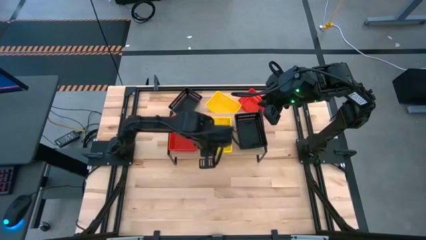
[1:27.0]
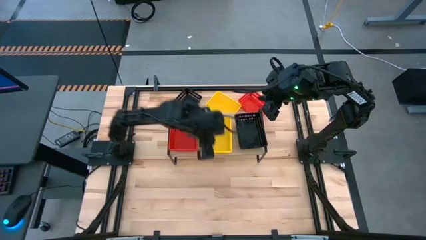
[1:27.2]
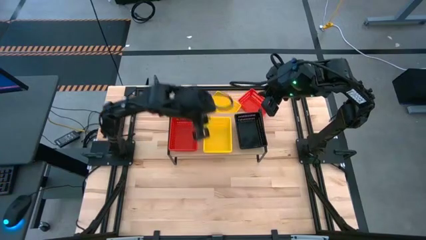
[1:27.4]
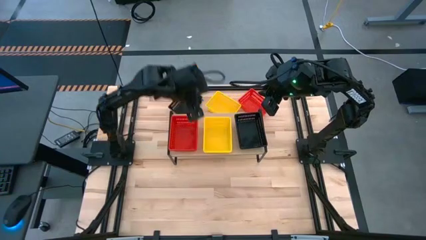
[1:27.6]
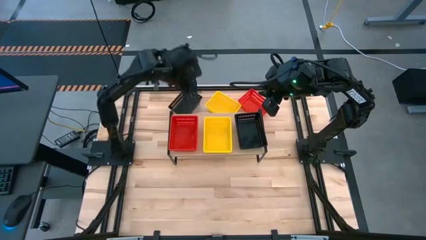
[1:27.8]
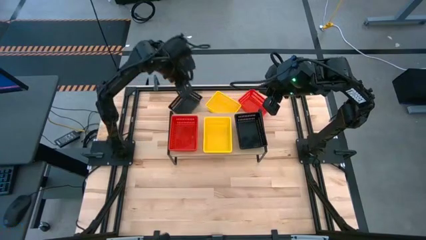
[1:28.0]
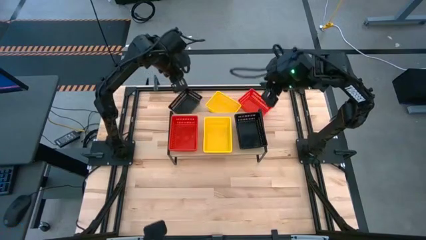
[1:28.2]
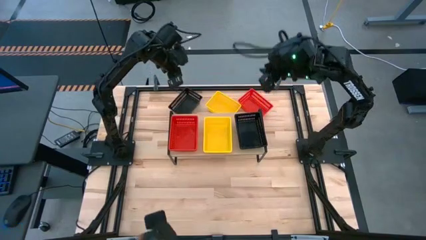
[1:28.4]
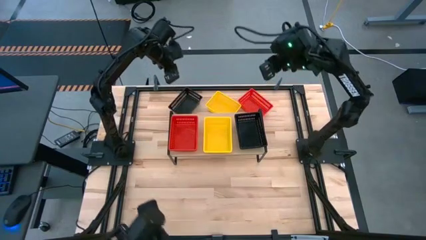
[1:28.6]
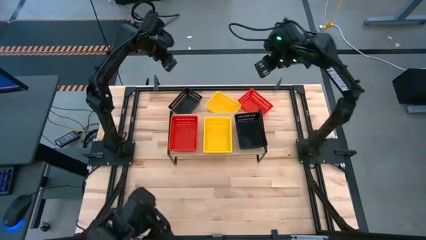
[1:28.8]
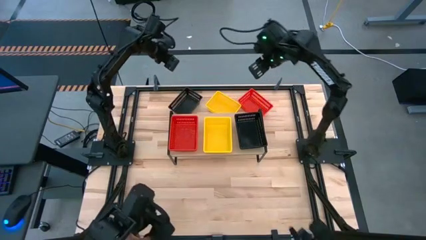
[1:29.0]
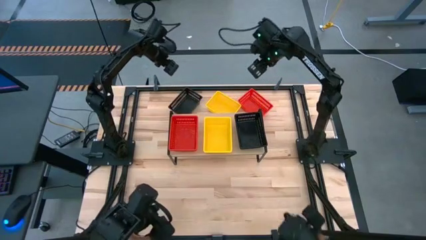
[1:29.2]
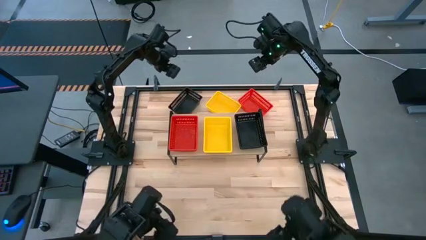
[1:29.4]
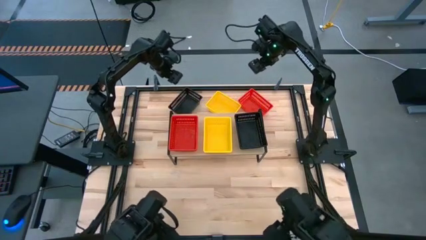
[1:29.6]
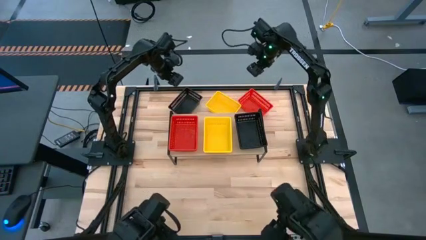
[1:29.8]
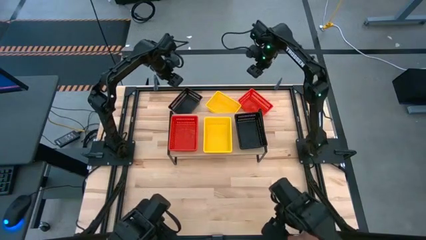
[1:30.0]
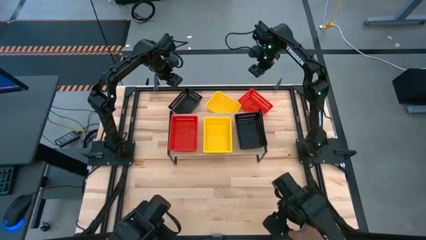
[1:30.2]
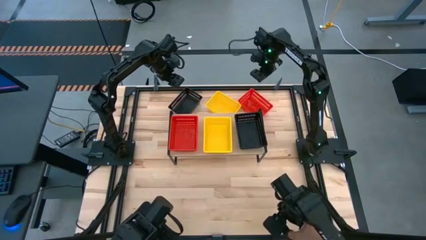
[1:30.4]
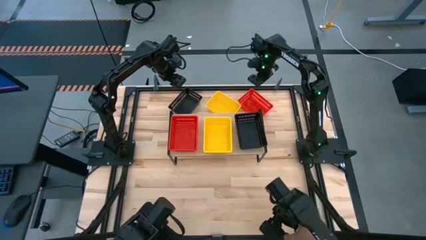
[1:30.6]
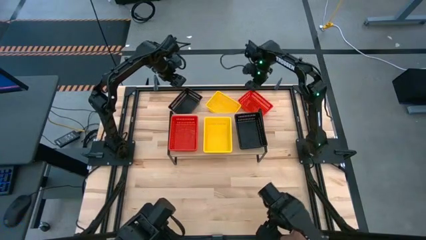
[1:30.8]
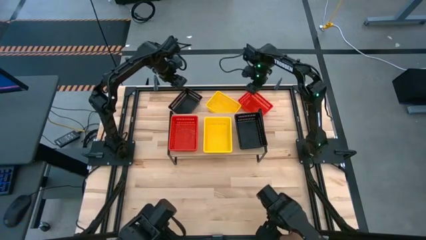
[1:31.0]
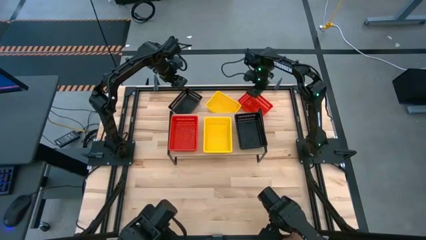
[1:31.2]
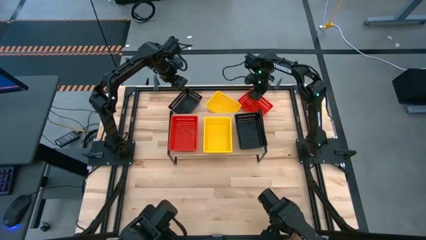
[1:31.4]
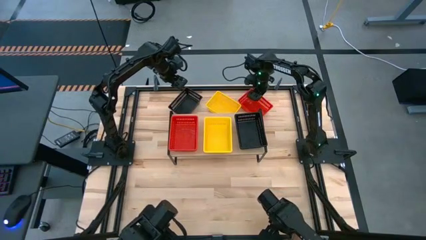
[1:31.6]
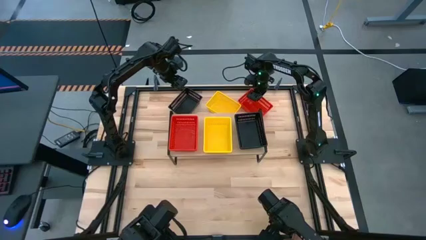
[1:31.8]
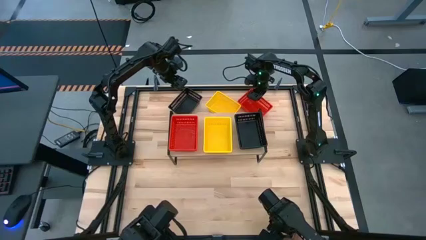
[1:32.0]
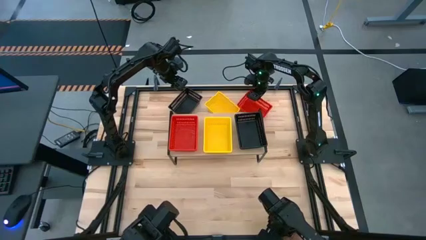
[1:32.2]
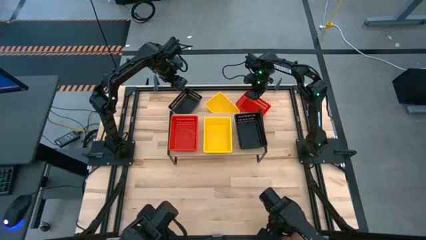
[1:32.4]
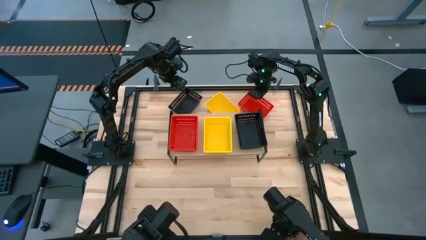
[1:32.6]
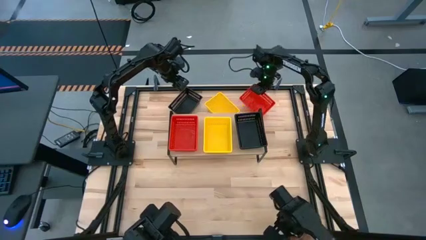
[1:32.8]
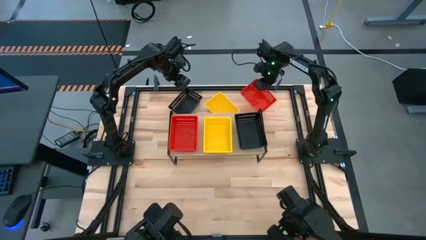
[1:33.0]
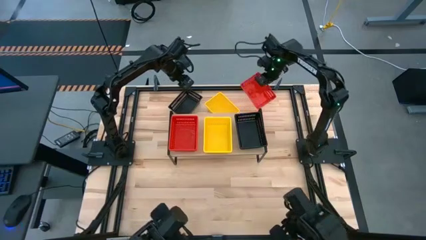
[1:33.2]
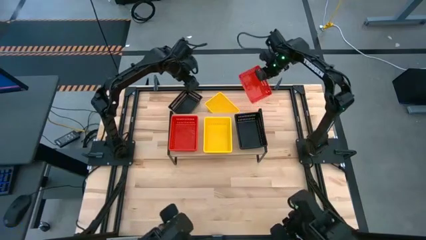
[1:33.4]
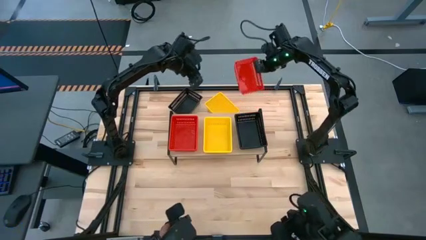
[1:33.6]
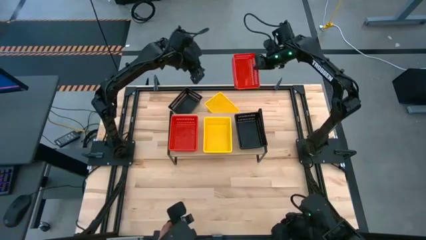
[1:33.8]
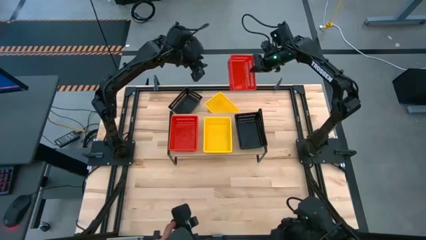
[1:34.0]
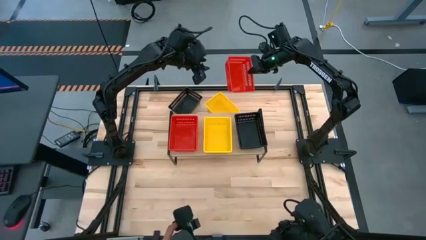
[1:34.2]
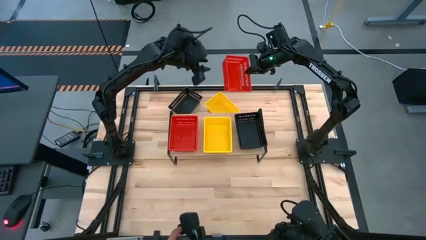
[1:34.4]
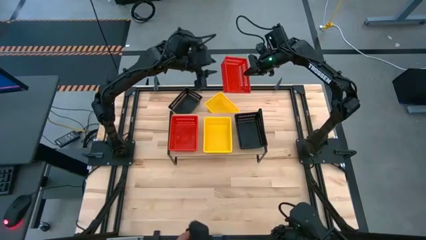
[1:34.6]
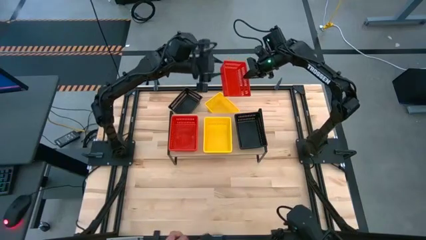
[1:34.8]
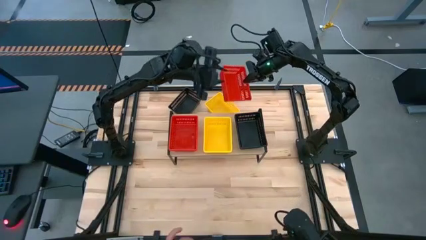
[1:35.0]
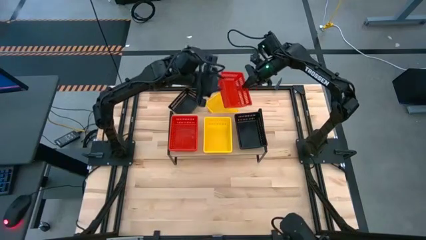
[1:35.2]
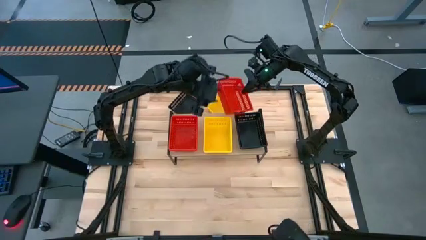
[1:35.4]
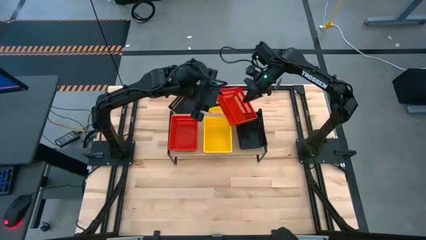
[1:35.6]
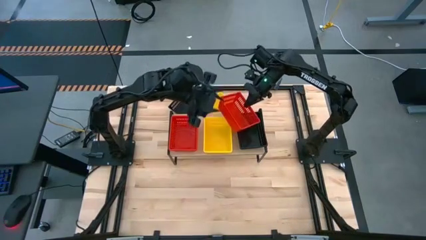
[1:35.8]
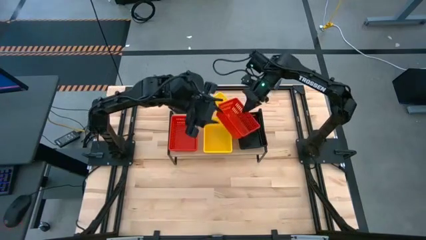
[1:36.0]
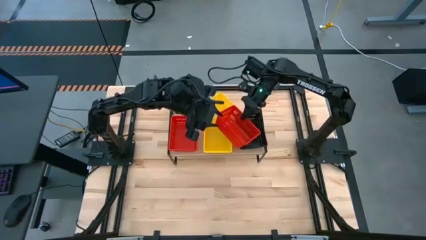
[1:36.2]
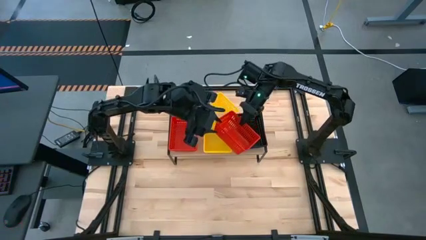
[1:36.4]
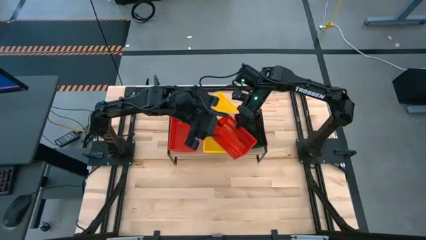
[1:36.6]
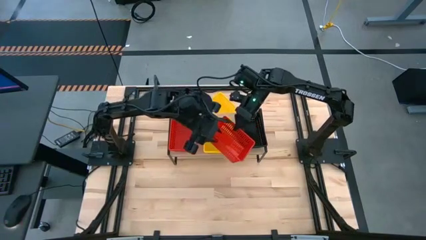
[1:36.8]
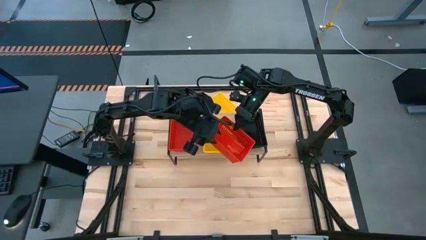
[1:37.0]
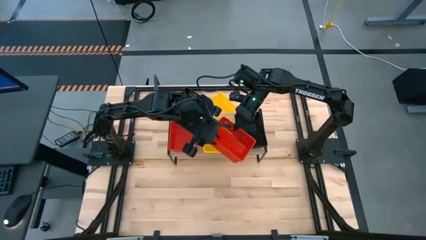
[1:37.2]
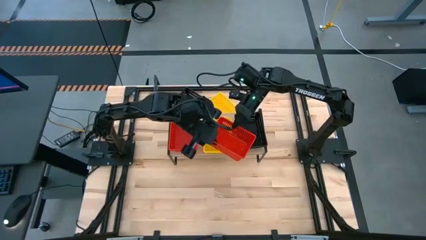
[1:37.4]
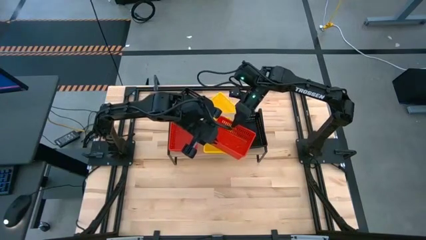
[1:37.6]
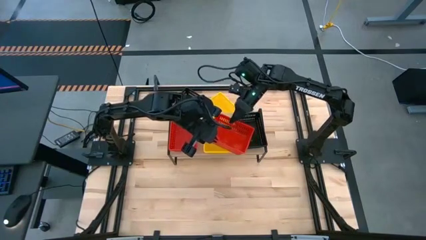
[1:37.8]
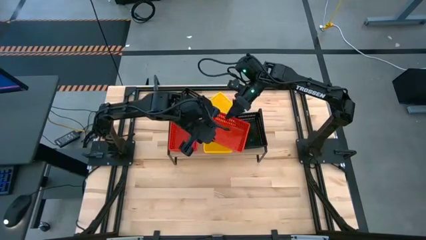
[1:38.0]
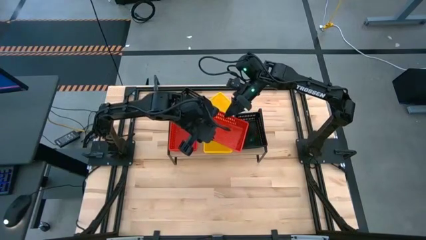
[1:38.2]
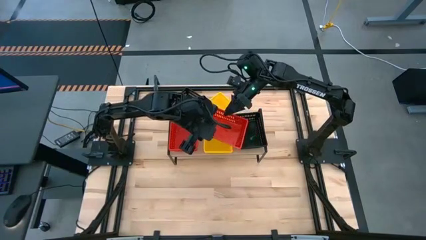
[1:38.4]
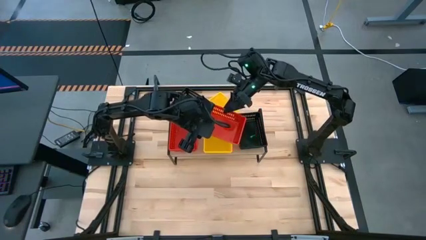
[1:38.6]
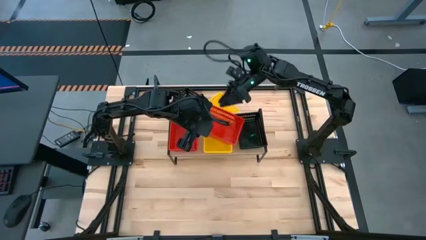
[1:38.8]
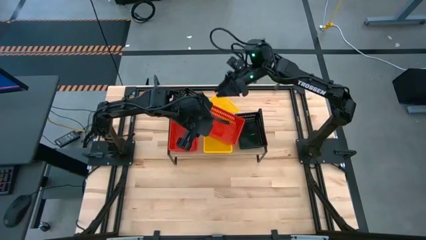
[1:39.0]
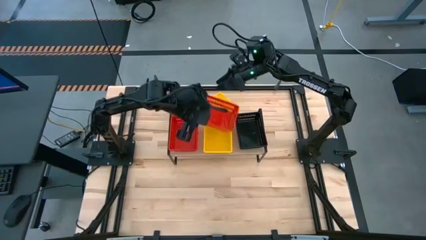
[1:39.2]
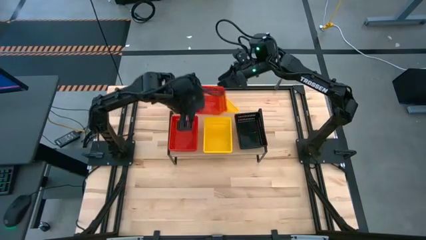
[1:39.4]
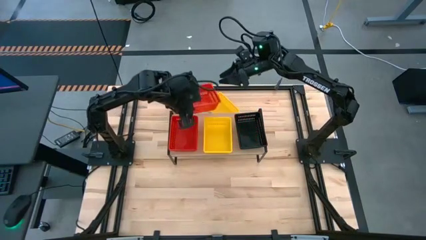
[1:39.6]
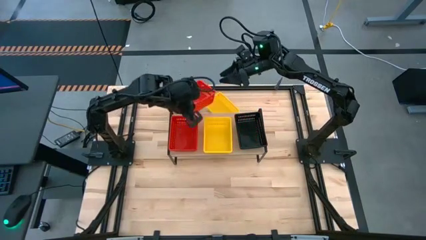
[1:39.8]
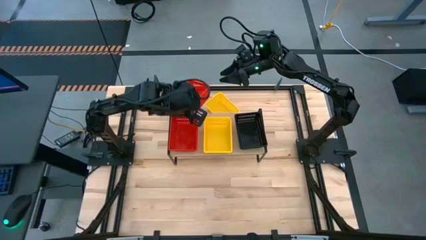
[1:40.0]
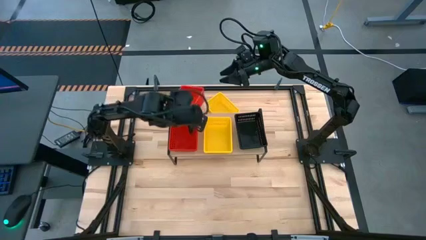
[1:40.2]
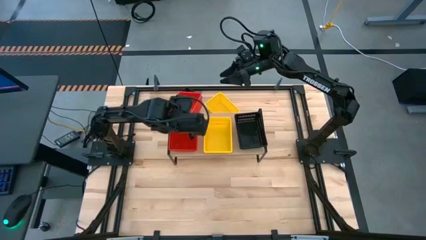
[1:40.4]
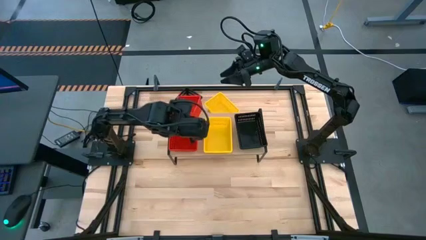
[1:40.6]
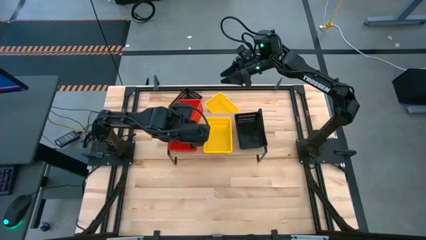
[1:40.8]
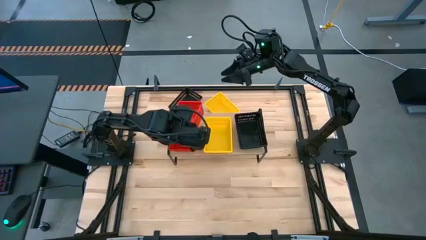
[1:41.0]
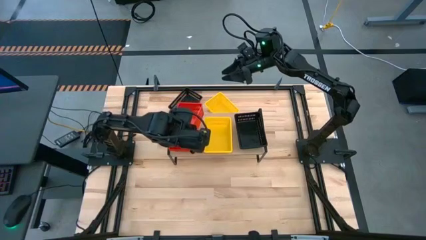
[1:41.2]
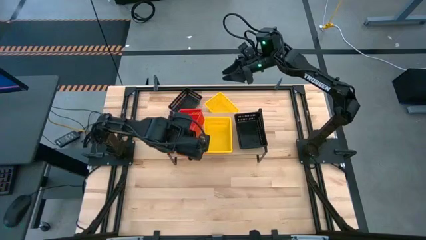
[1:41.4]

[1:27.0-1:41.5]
Task: Stack baskets on shelf by color
Stack the red bin on top of the red bin on the shelf

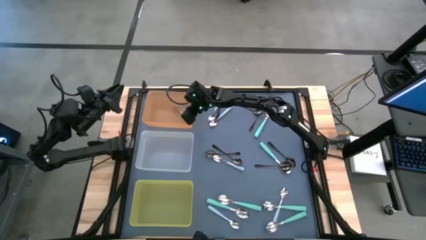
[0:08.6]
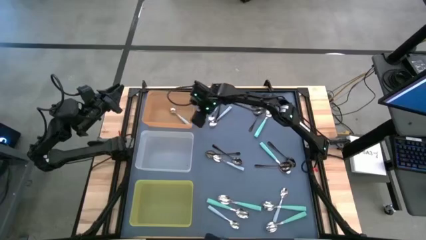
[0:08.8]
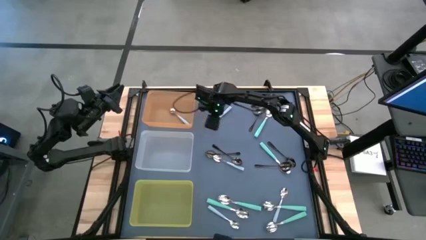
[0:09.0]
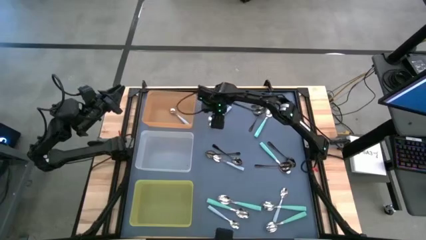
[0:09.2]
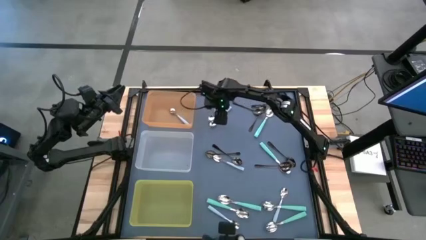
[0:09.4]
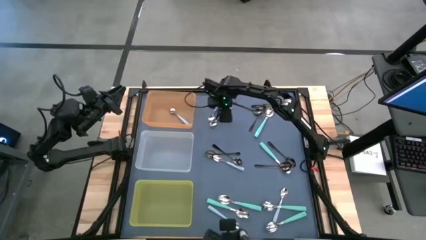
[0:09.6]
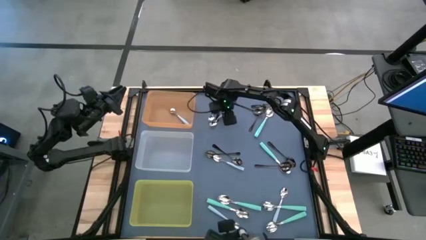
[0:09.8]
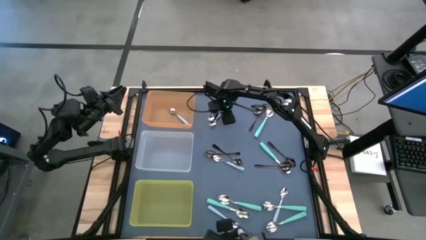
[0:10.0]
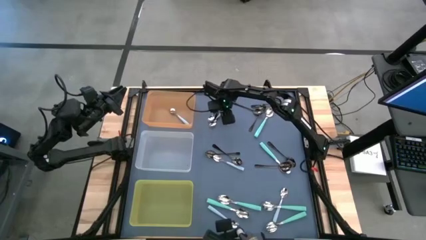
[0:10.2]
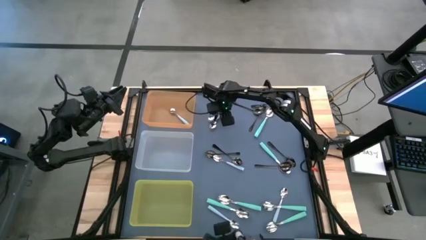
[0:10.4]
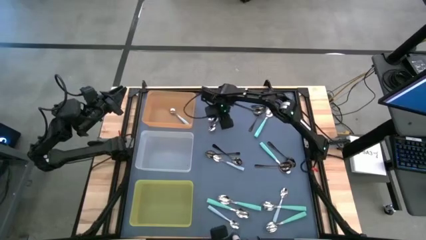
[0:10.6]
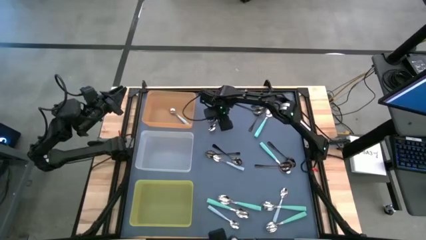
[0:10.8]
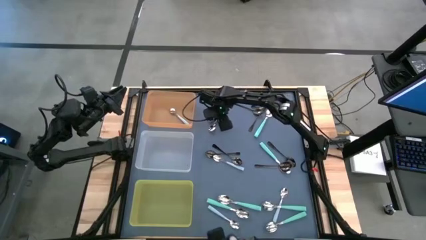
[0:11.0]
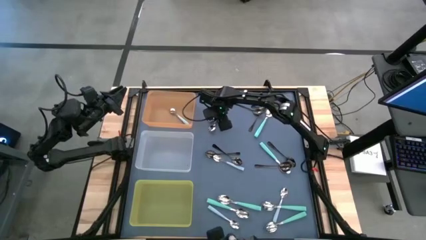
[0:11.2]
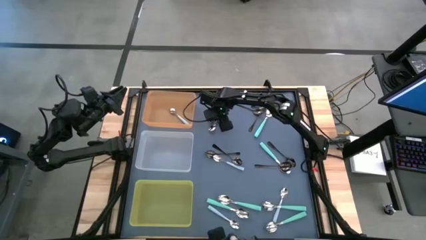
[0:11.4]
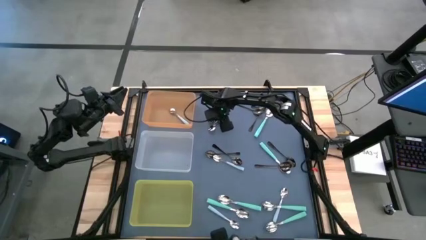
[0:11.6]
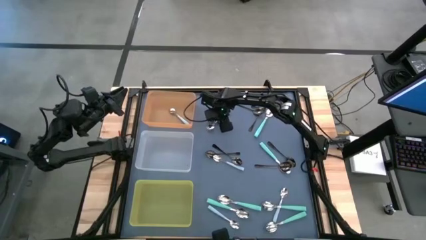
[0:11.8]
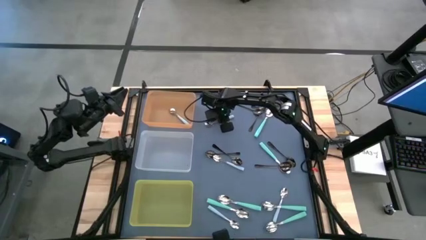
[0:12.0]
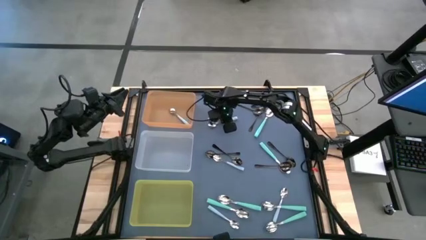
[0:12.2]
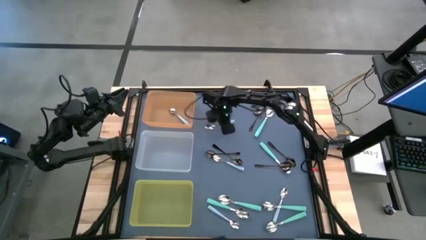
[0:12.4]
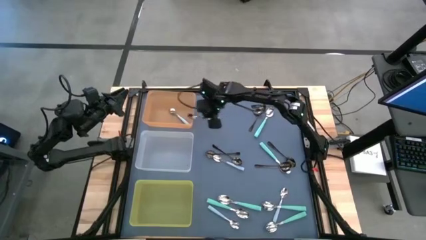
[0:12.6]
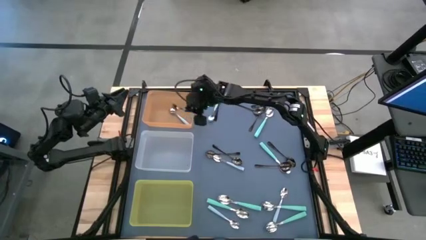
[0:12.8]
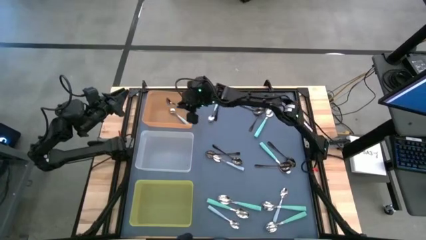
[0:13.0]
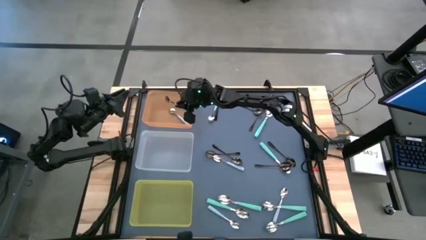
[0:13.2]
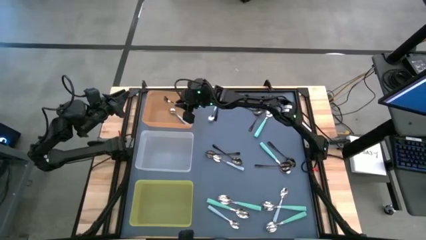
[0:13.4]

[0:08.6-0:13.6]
Task: Sort silverware by color (type)
Put the light blue spoon into the orange bin
